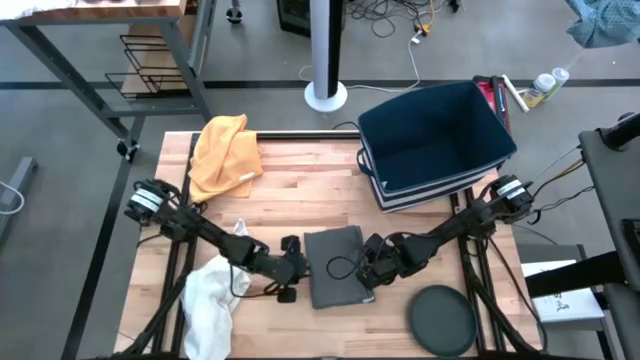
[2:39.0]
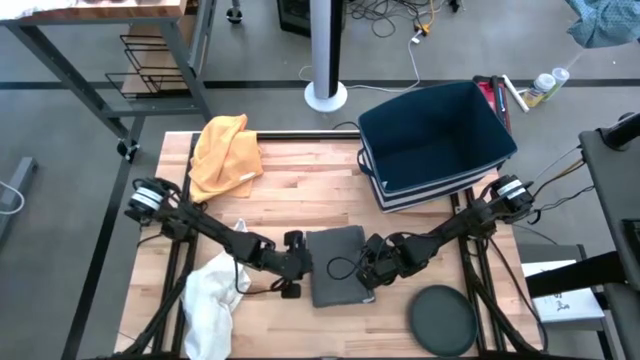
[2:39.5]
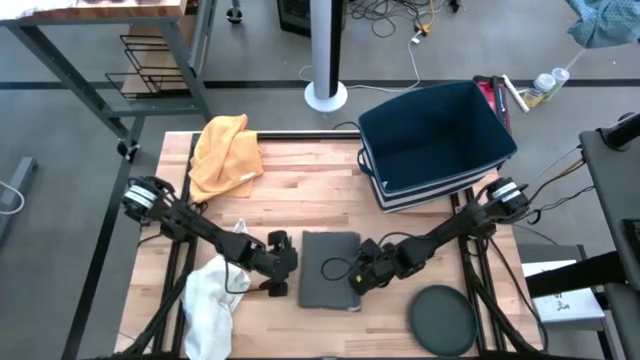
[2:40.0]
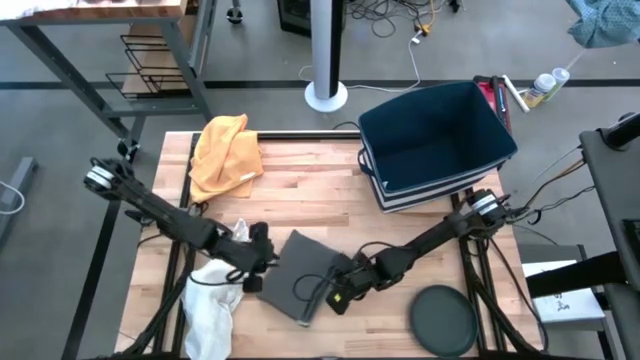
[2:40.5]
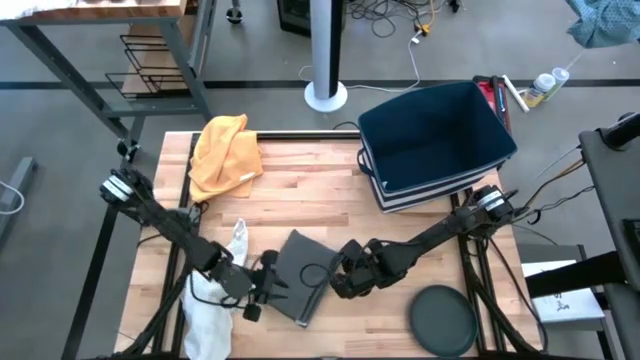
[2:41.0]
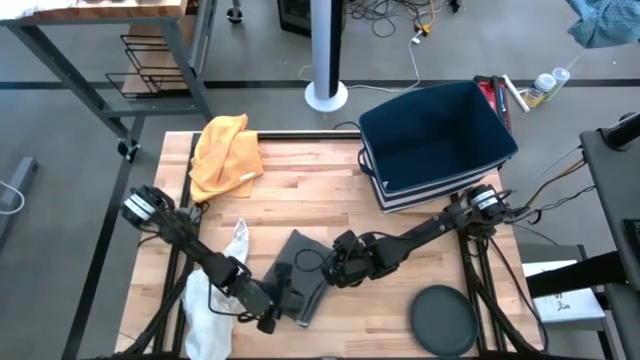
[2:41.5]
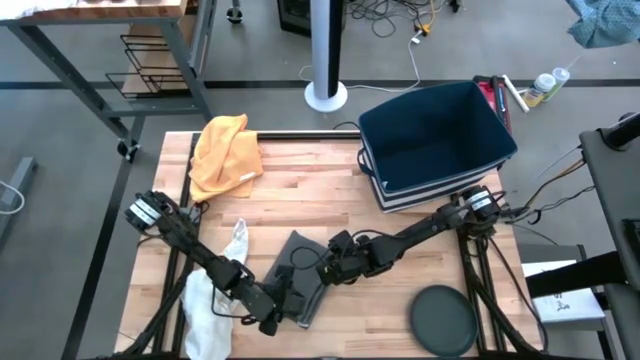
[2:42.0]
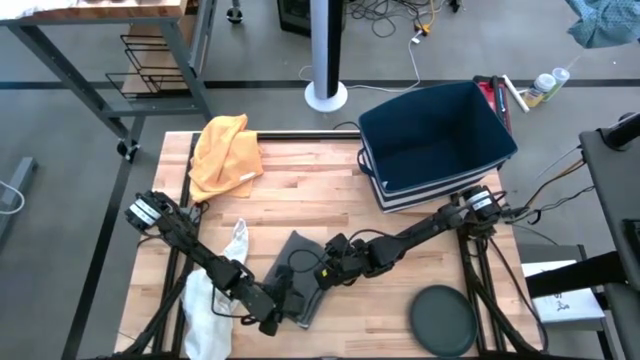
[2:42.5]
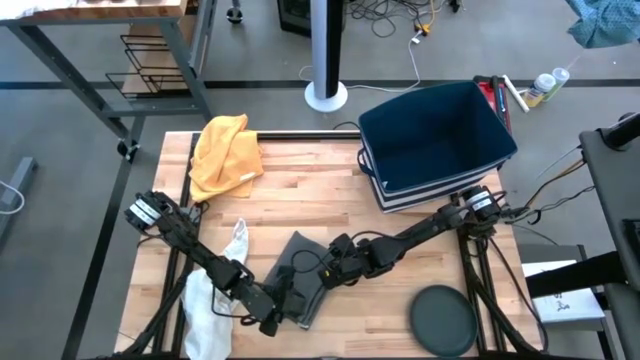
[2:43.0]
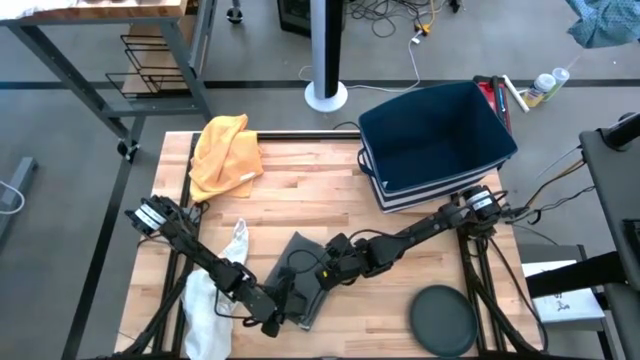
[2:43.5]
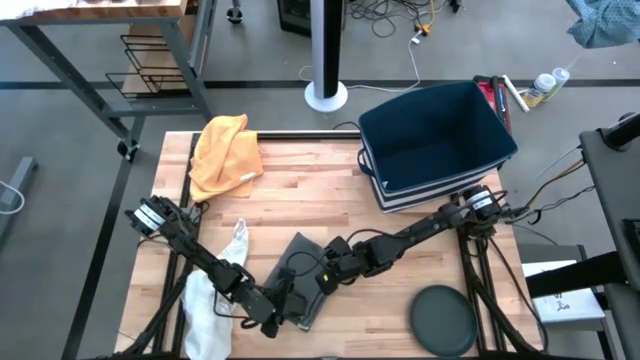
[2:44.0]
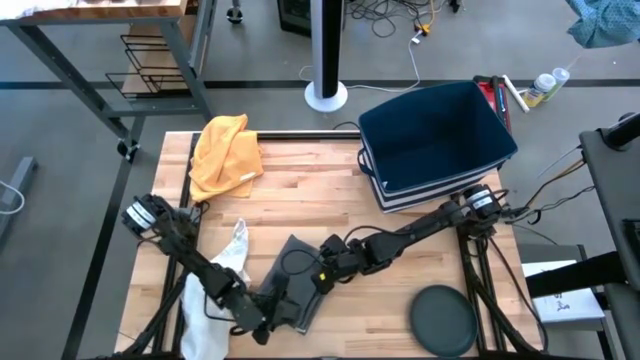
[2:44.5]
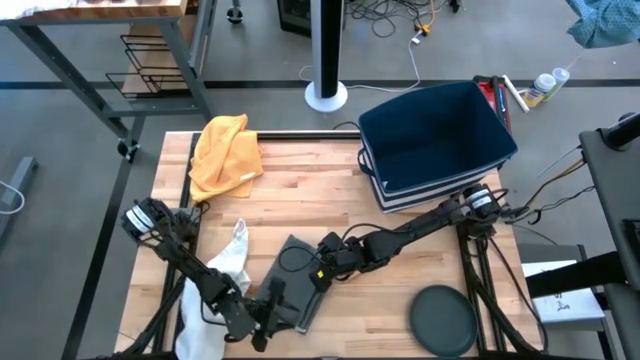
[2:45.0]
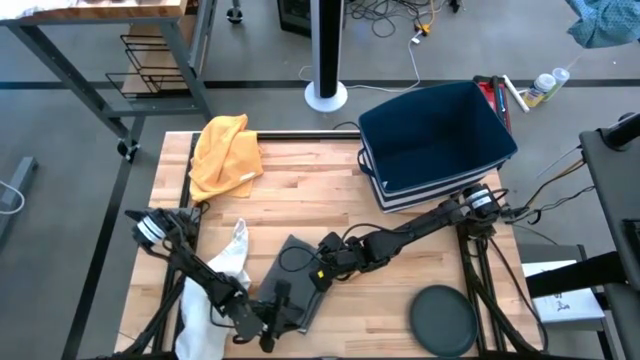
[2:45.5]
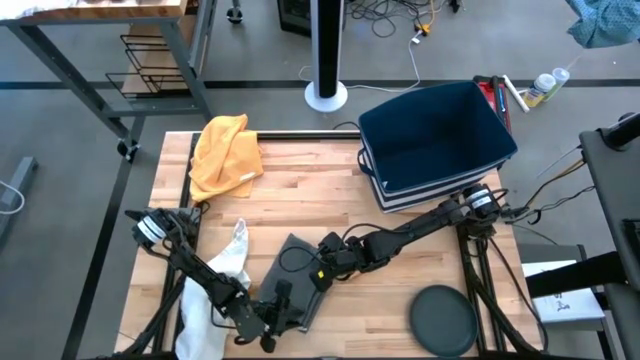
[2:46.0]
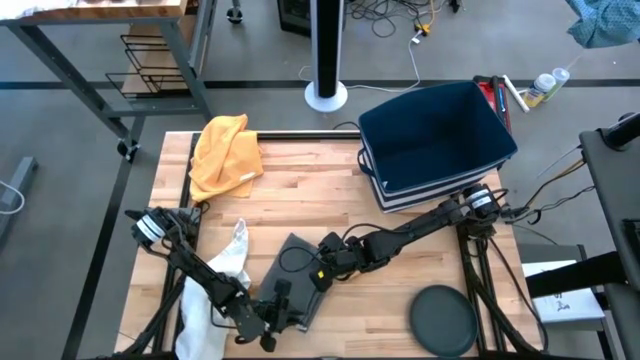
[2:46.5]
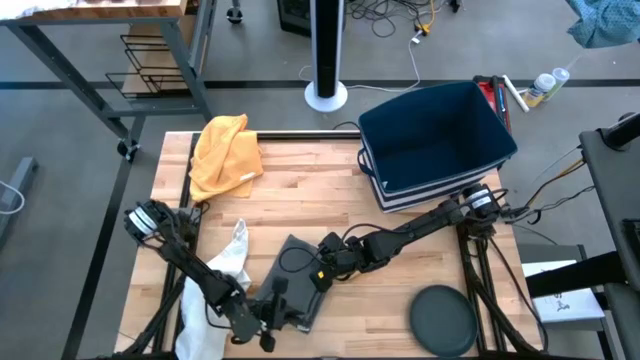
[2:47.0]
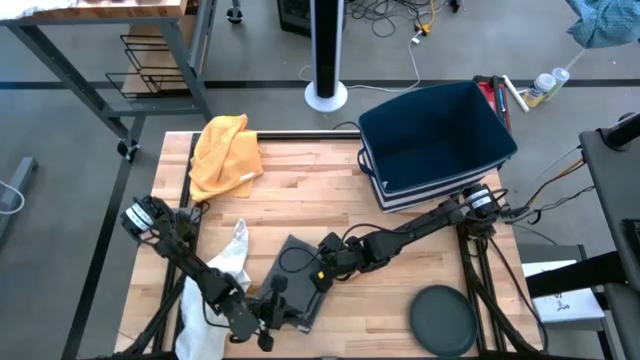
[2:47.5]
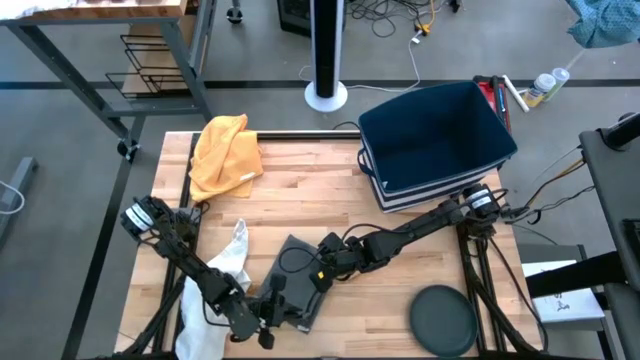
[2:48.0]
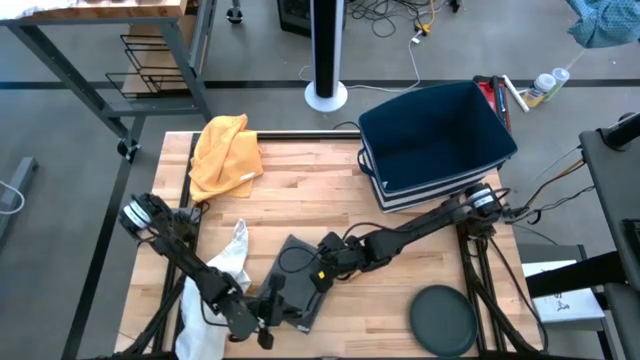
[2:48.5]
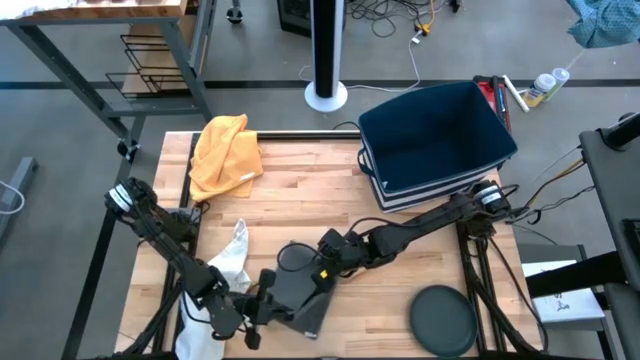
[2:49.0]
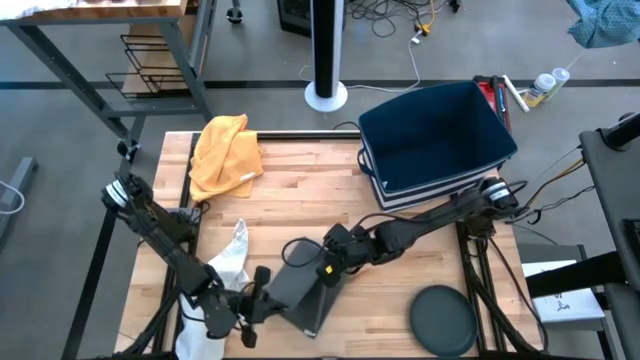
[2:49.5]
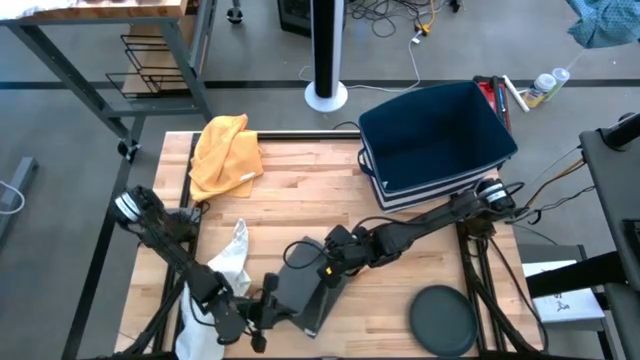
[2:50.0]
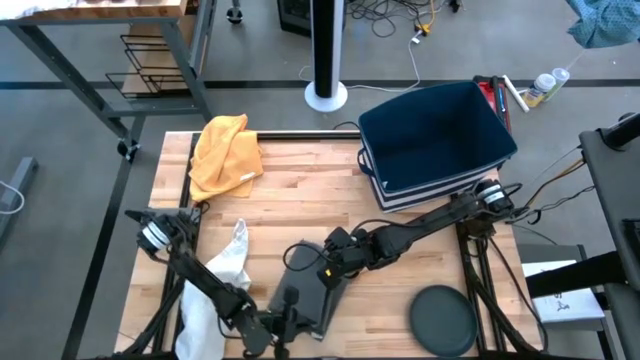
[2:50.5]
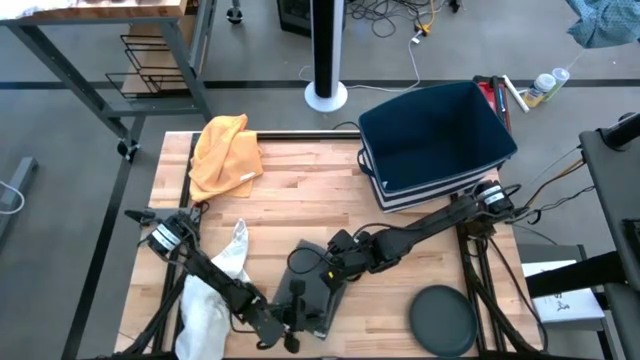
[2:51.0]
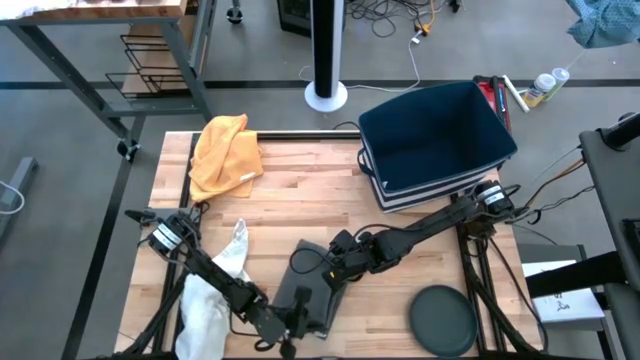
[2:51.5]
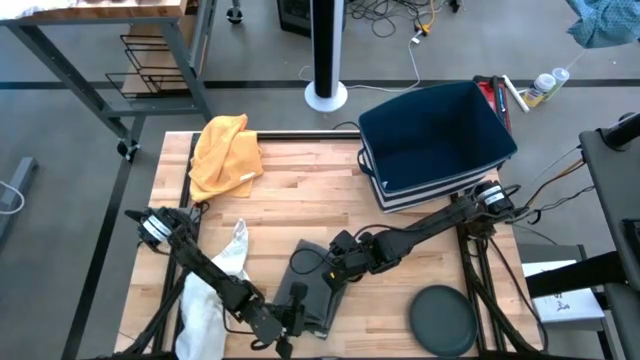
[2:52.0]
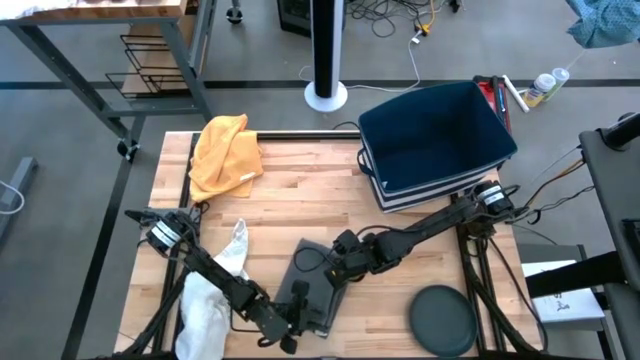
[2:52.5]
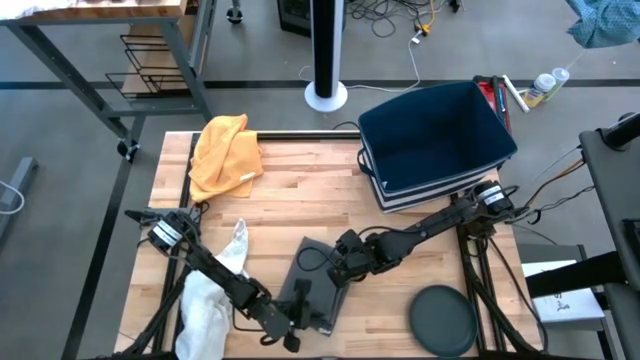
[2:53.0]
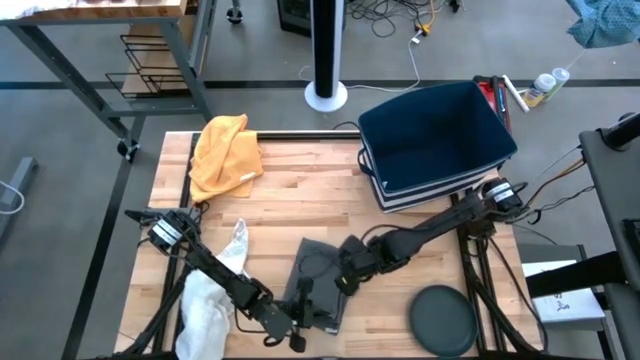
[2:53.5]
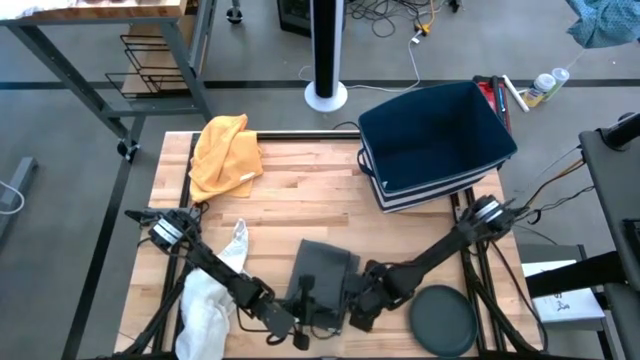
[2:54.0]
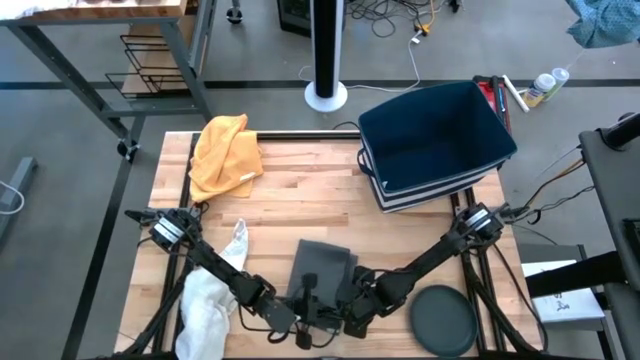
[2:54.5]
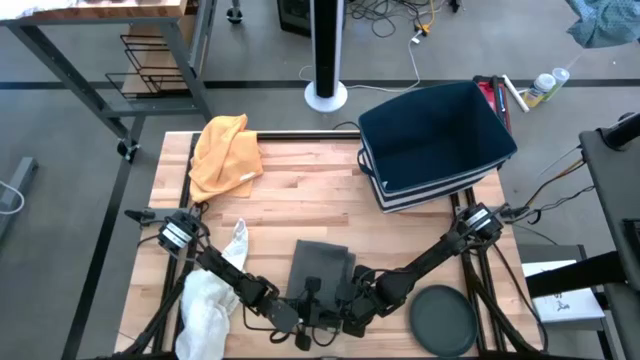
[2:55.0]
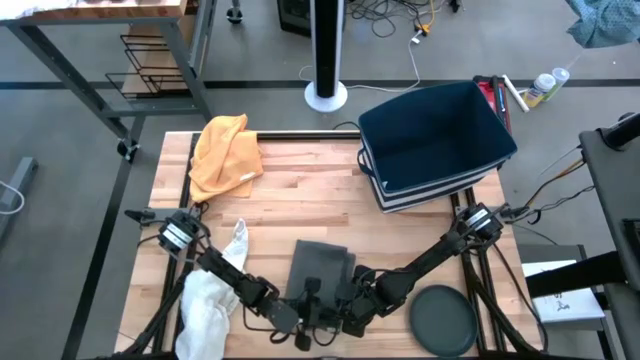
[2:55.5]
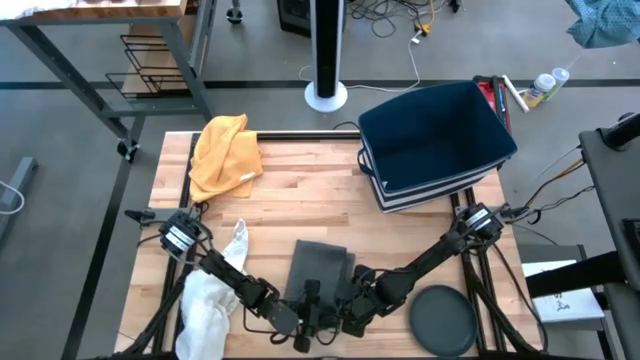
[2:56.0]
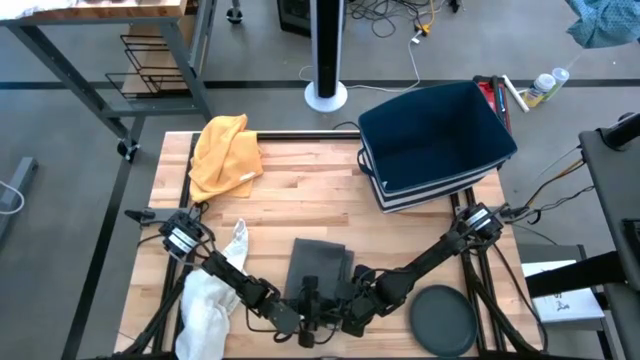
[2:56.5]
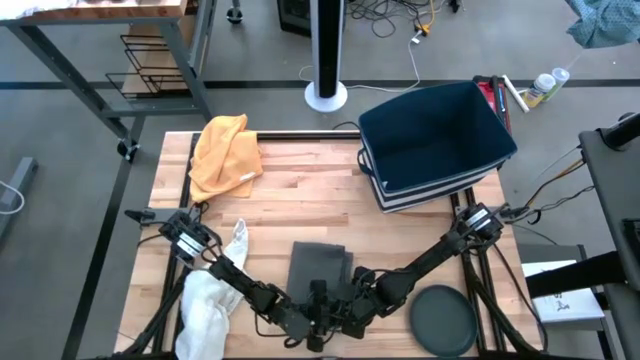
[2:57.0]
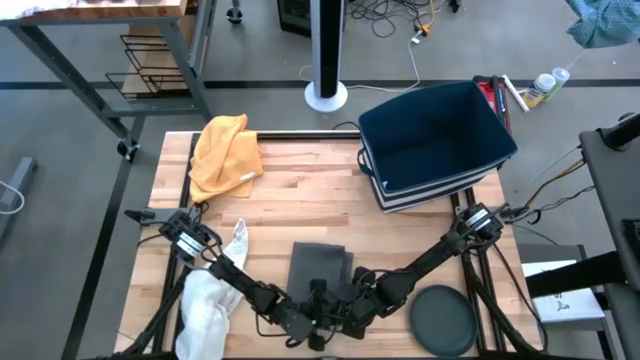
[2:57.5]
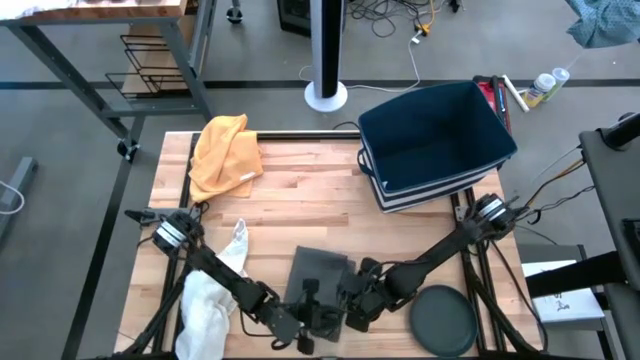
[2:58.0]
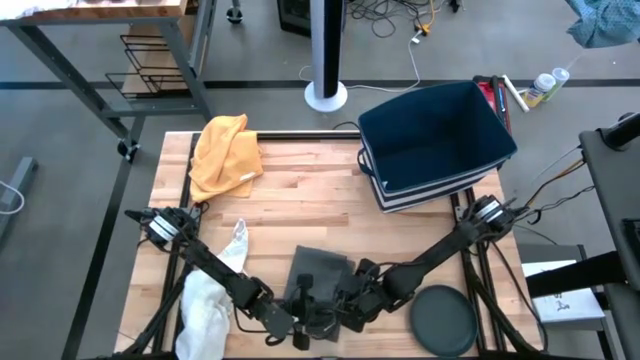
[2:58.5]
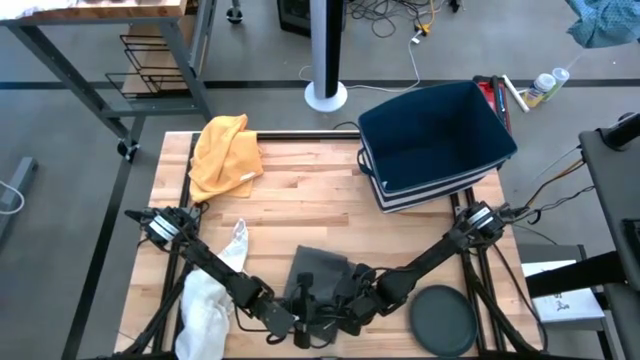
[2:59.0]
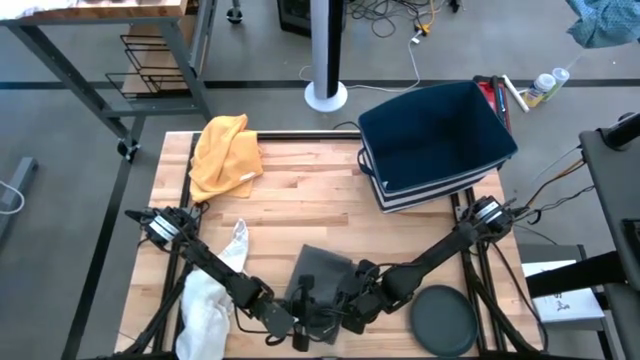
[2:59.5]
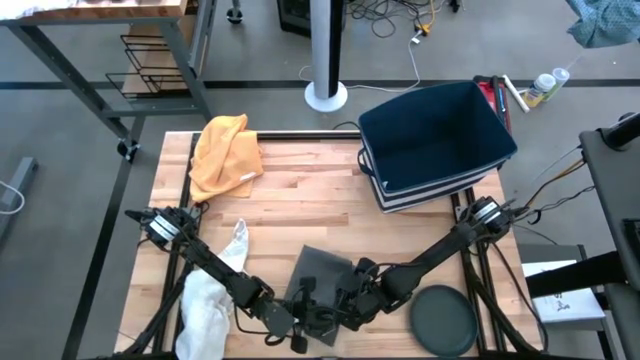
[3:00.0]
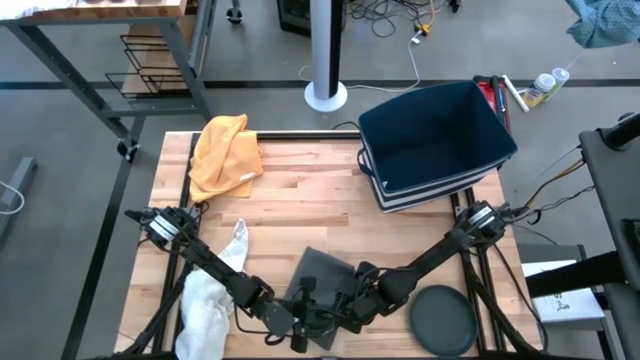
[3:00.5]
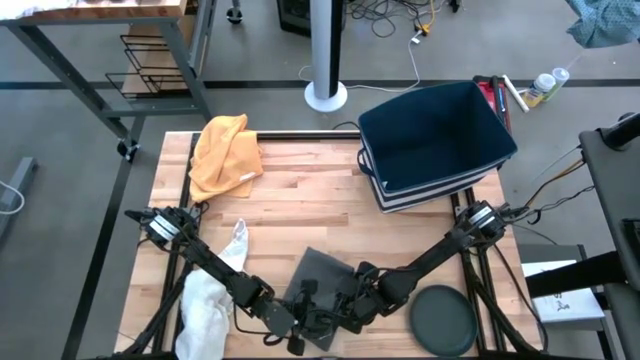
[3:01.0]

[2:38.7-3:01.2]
Task: Fold kitchen towel into neat rectangle
Fold the gray towel
